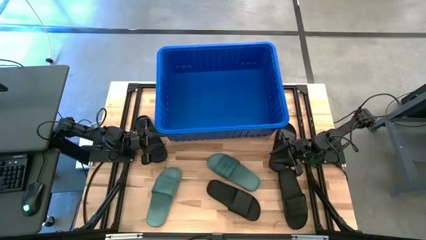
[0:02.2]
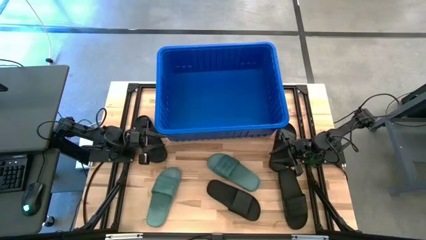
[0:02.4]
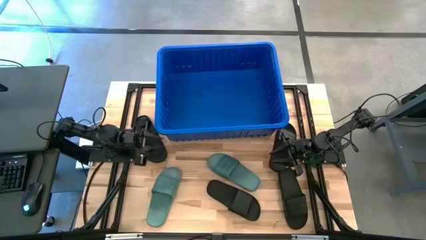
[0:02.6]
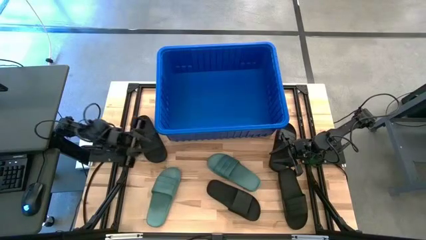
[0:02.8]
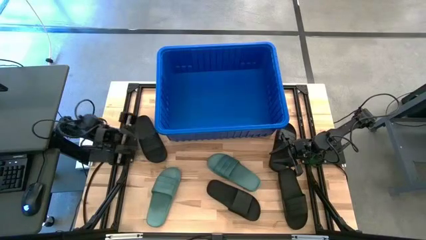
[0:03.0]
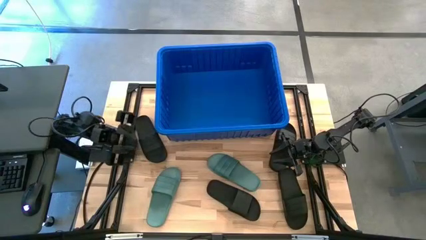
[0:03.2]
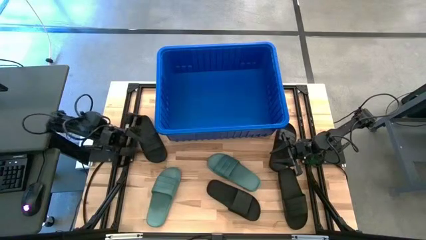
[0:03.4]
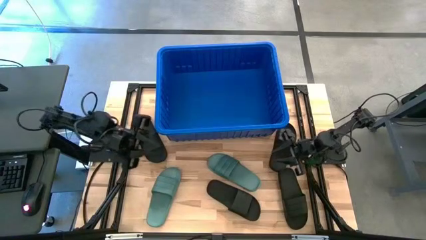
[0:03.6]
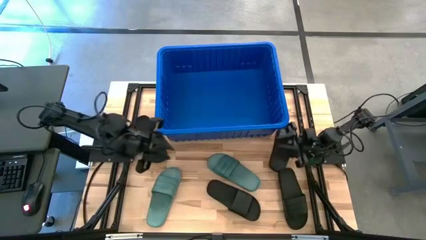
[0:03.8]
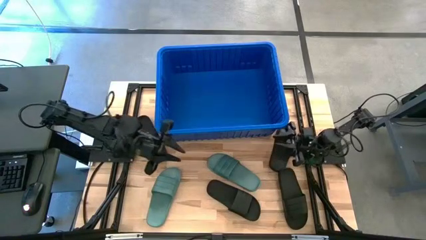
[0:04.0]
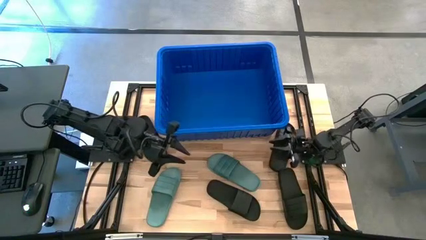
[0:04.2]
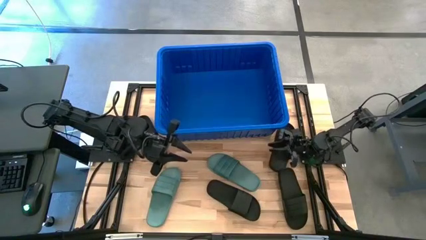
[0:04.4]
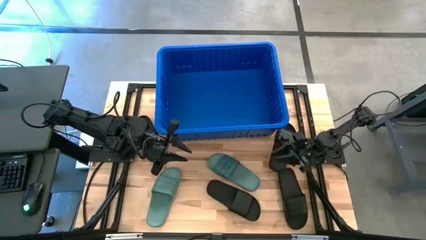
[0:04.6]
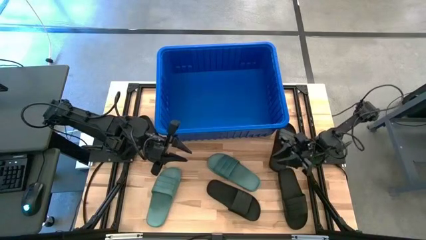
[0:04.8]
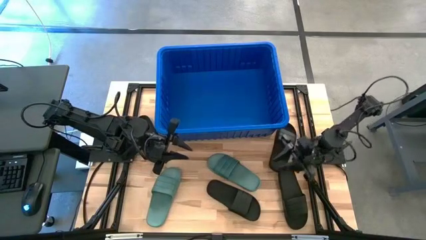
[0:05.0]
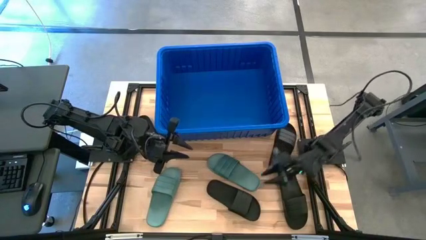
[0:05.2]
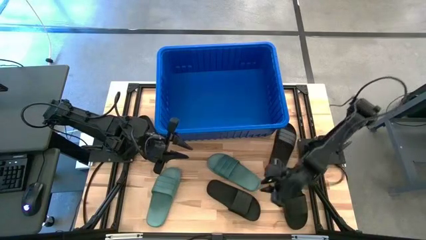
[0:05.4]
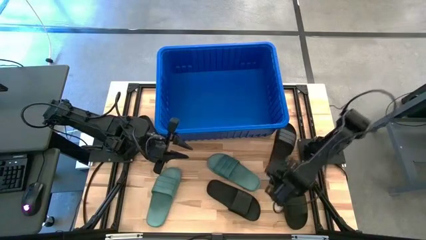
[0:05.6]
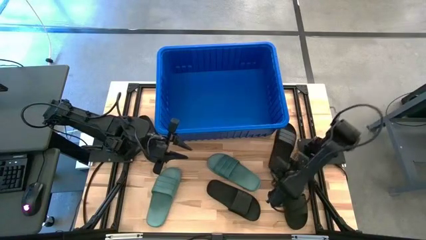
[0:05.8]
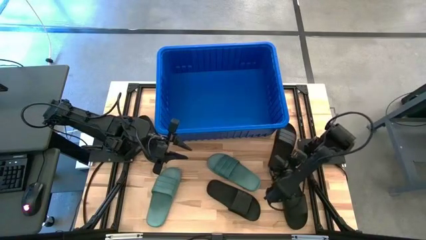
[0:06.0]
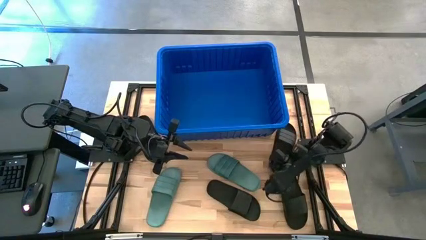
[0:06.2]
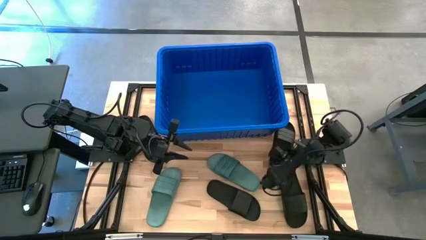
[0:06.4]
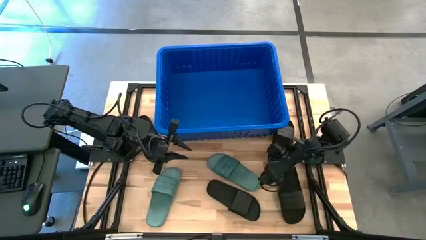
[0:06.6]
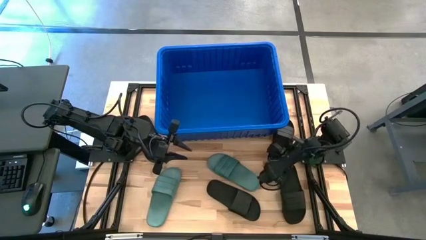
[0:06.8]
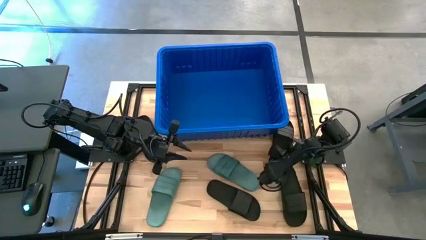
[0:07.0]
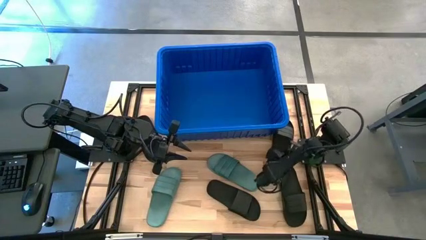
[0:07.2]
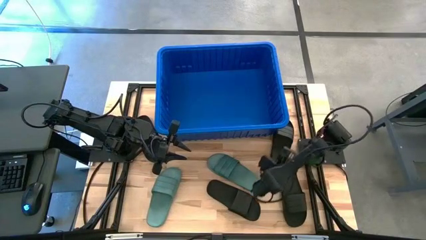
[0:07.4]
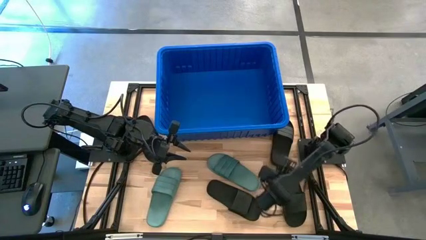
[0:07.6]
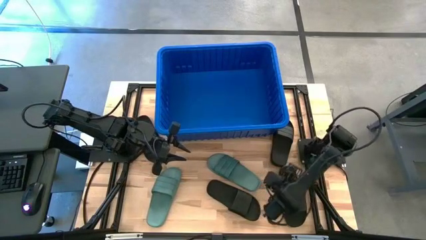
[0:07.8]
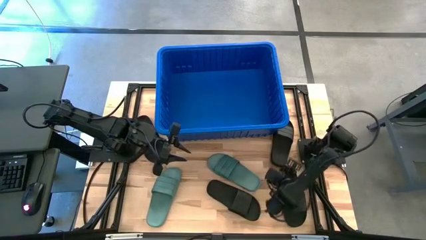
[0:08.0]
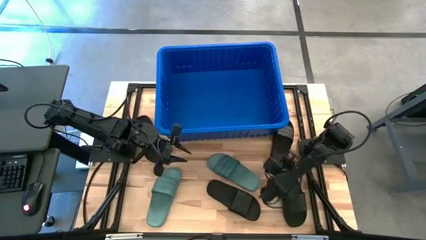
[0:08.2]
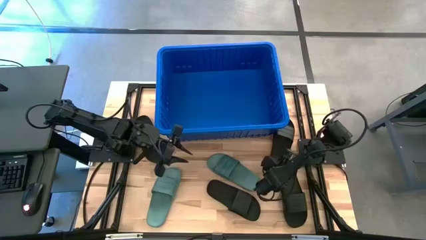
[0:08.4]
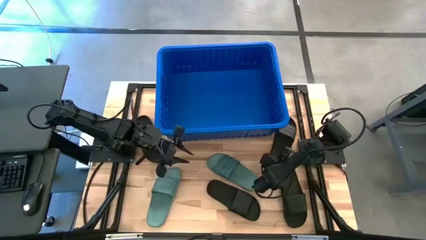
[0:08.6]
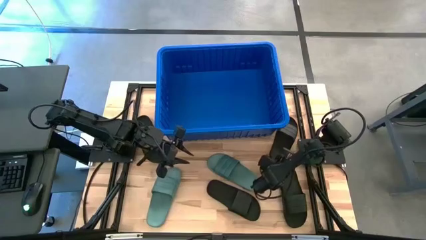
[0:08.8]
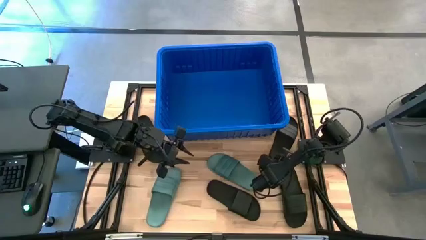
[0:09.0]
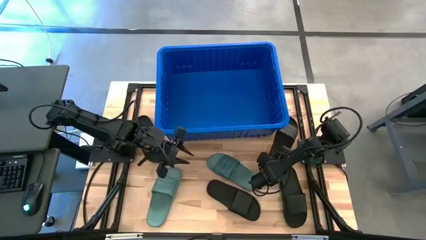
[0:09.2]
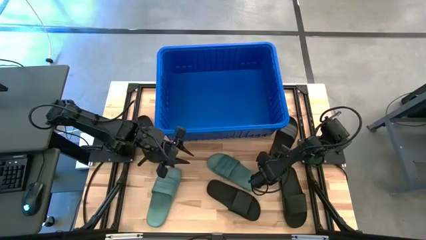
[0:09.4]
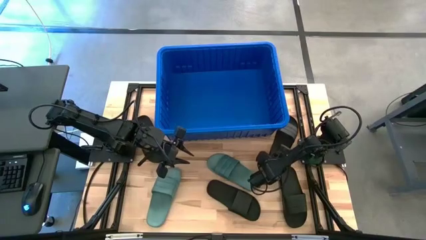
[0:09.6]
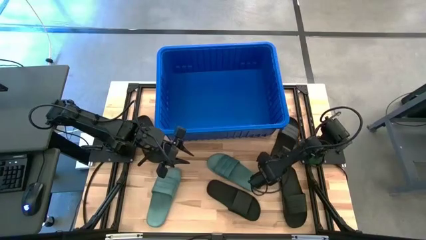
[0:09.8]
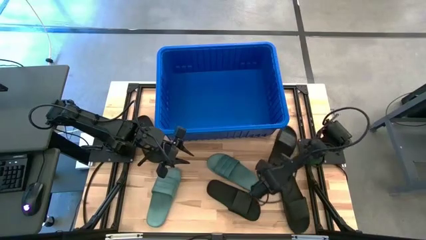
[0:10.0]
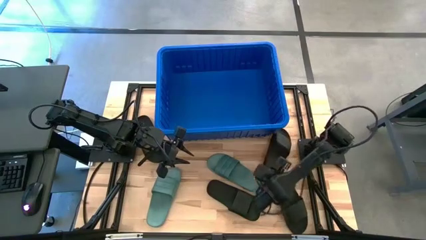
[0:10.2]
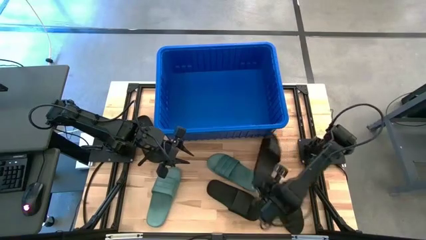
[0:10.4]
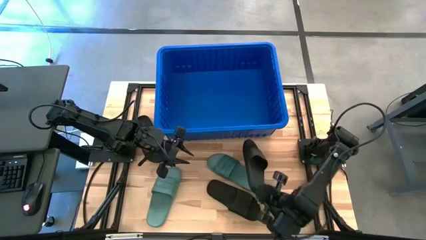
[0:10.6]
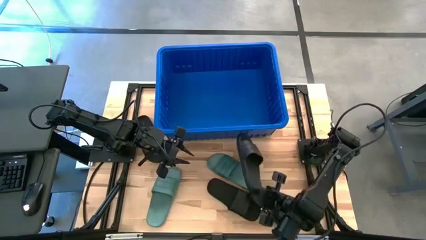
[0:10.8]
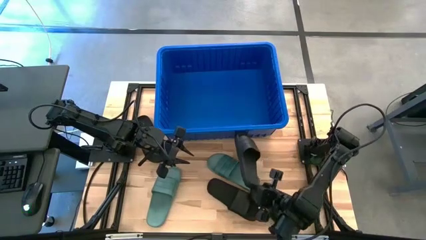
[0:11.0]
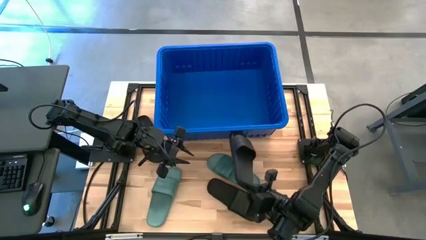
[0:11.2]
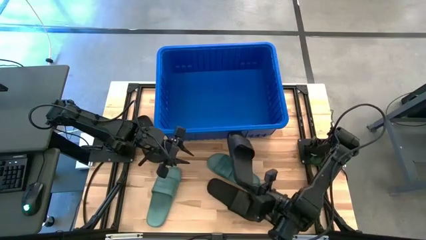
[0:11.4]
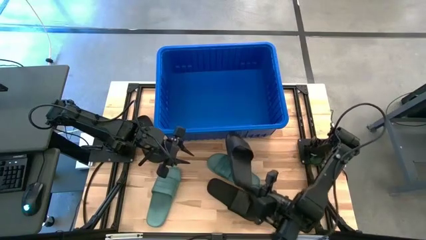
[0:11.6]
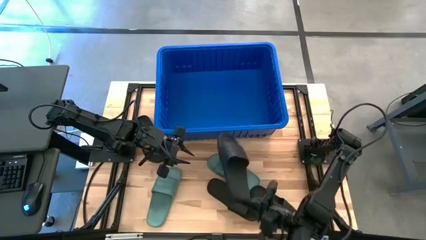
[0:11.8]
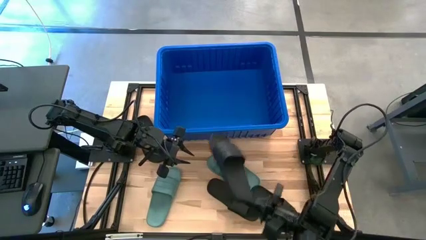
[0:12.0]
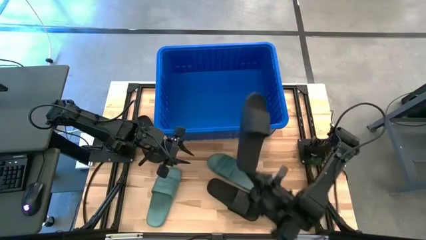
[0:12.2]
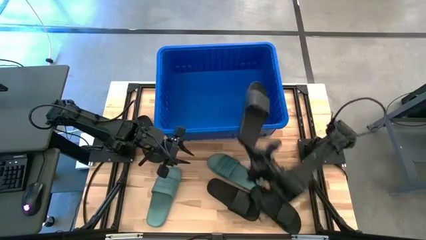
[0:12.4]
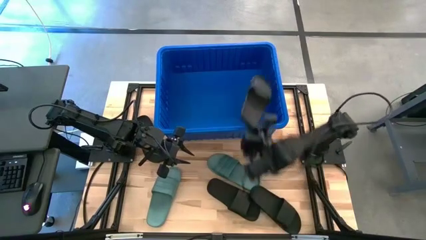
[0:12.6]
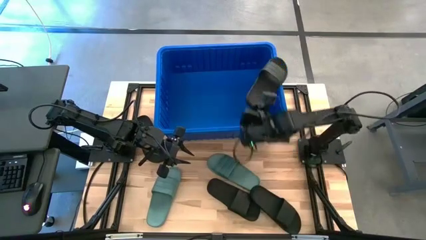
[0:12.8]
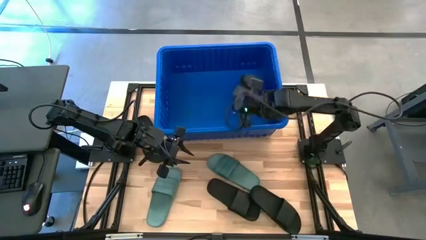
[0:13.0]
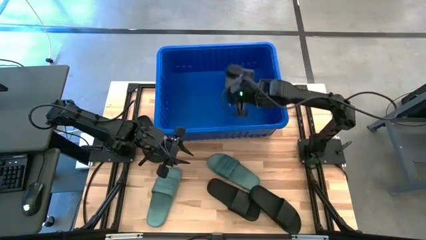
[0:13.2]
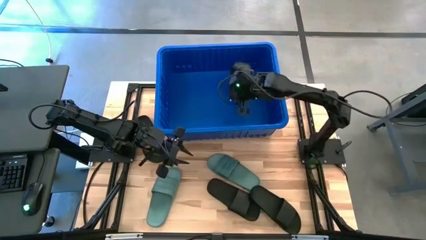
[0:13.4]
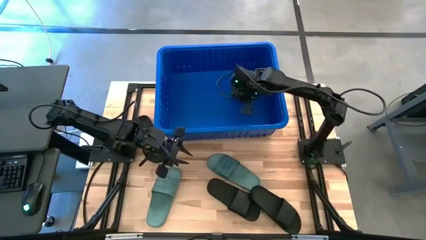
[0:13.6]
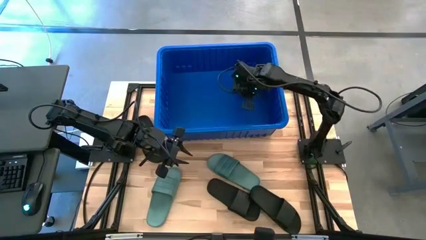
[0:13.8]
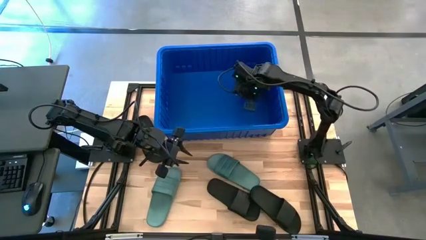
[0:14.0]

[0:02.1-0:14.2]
Task: Pick and place slides into bin
Put the black slipper into the blue bin

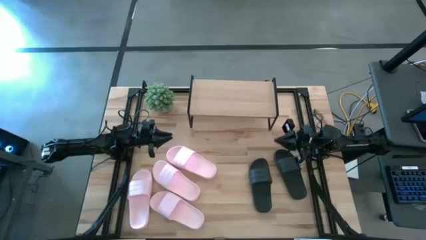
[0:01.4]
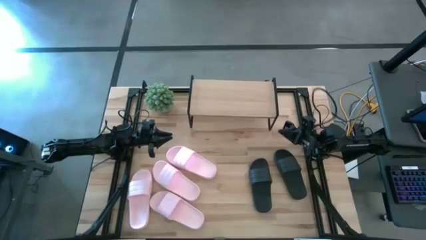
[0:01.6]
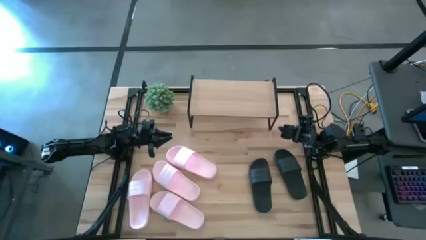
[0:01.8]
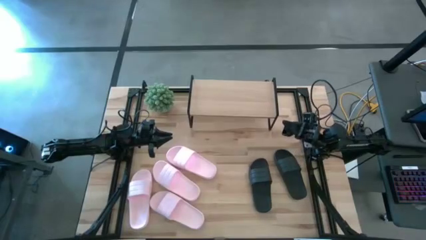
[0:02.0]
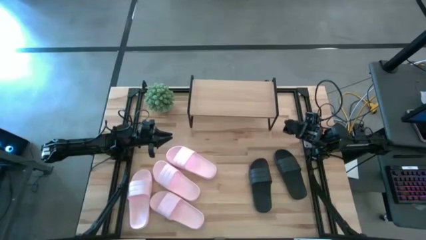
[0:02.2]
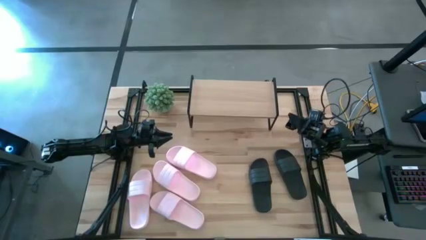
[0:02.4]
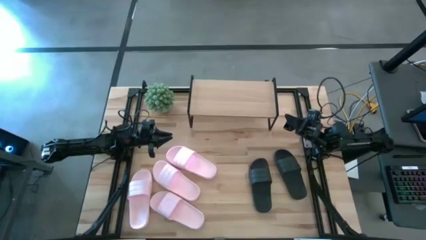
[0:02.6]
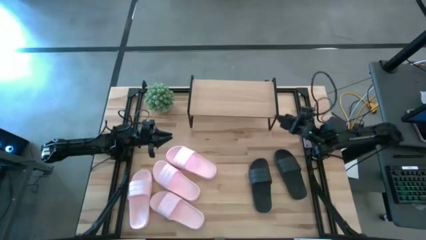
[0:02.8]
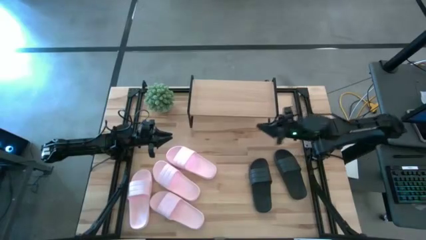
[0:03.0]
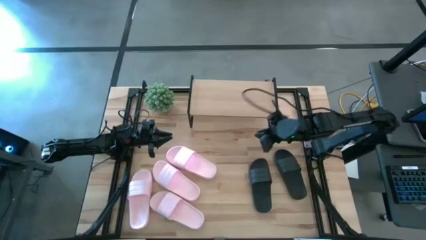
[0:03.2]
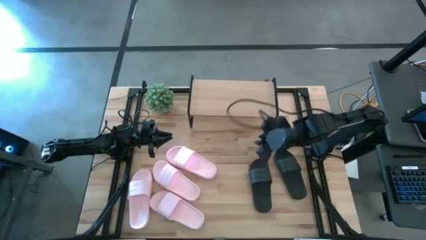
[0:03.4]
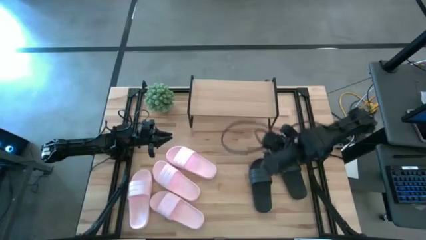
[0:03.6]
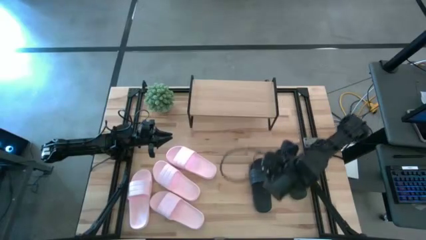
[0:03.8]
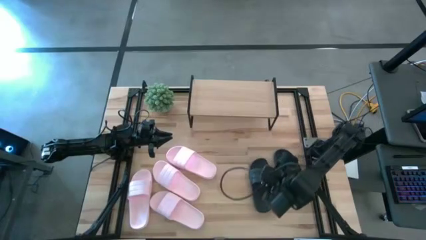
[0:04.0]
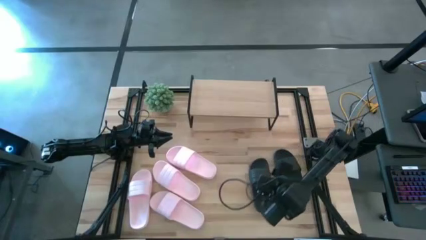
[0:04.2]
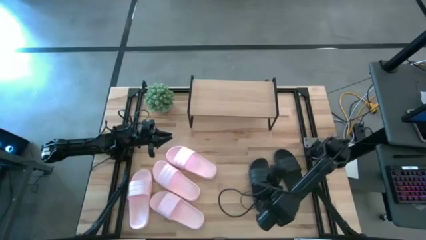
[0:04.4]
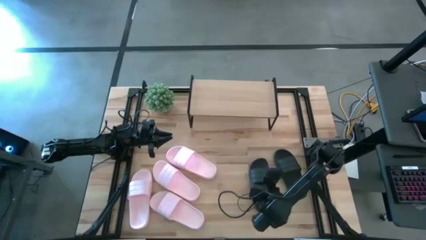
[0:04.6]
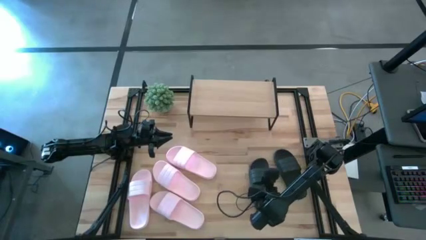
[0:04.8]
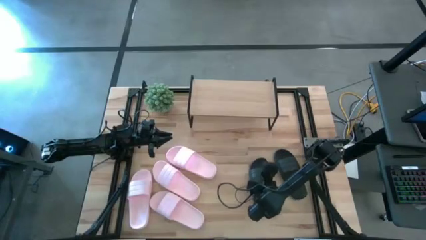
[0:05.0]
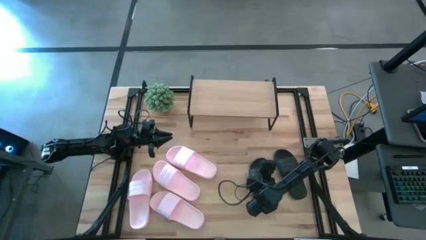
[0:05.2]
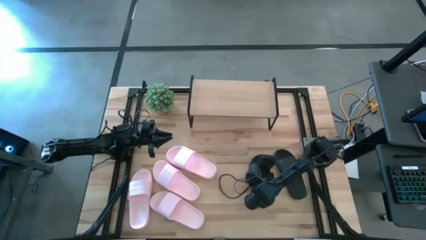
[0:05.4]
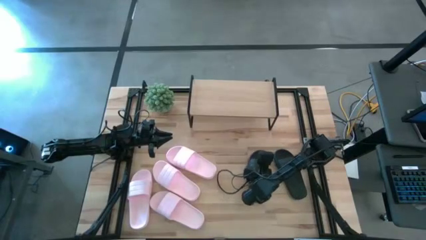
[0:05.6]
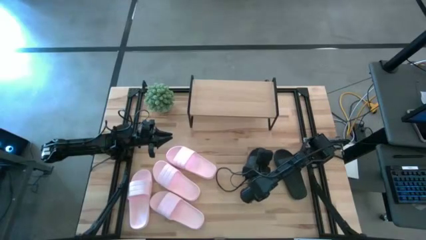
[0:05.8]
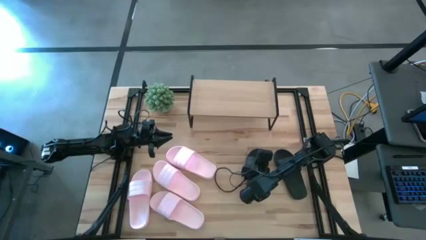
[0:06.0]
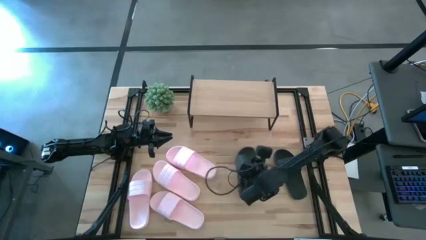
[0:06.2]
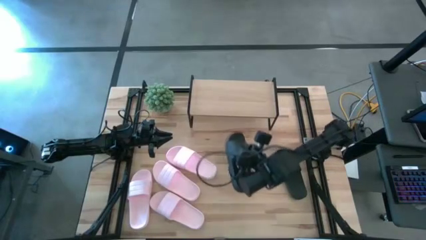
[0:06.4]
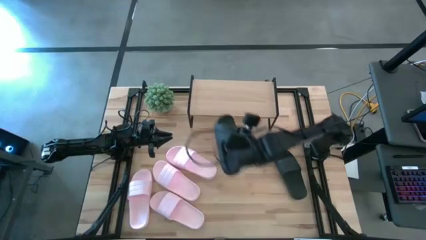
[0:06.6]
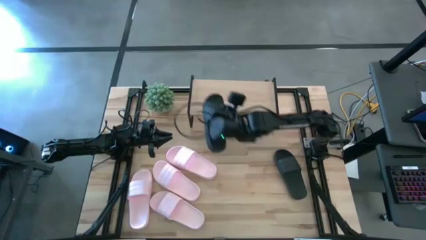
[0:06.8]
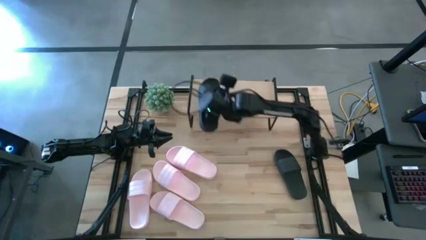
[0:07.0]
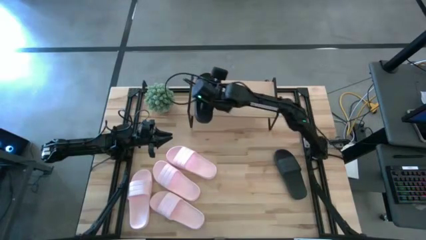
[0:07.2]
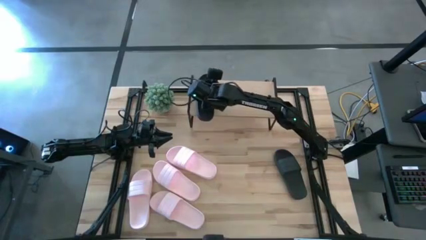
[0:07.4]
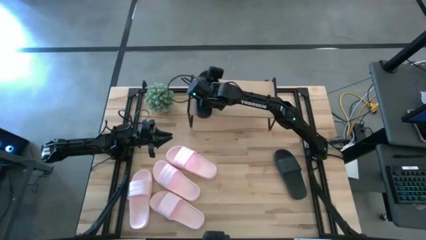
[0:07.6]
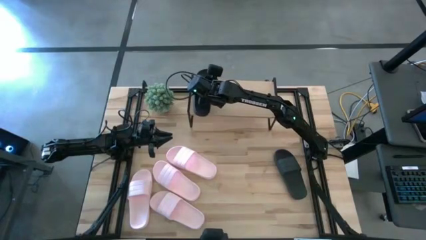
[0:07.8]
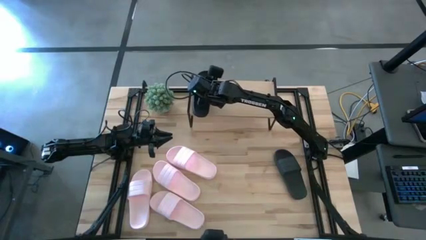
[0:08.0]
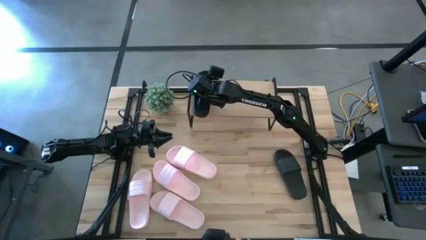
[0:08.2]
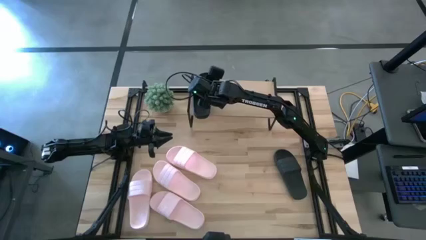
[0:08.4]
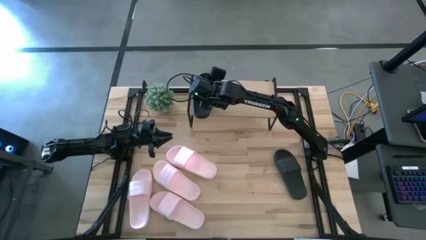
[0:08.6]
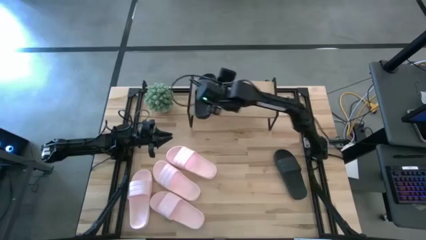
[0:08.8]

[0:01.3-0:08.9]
Task: Pick and place slides into the shelf
Put the left black slipper on the shelf
